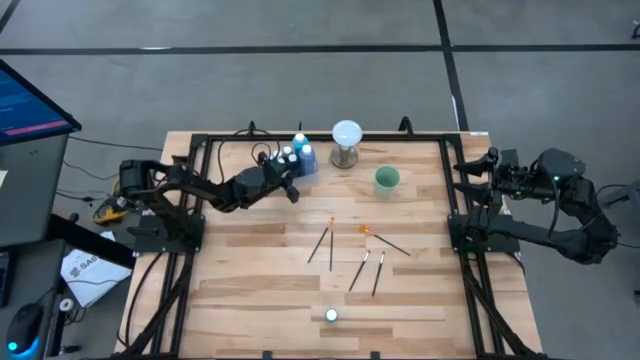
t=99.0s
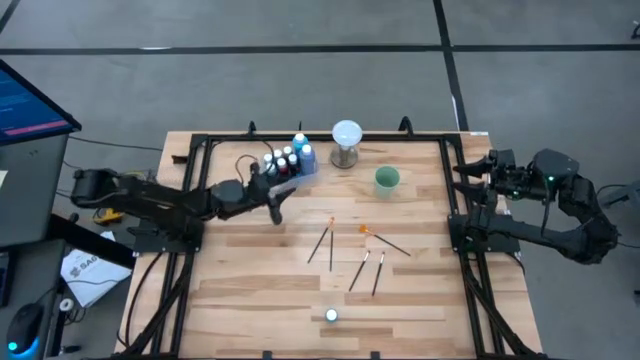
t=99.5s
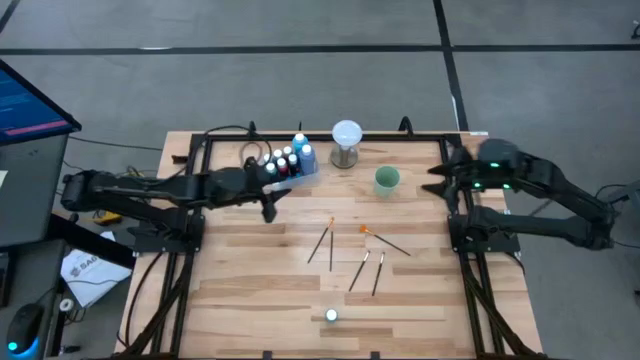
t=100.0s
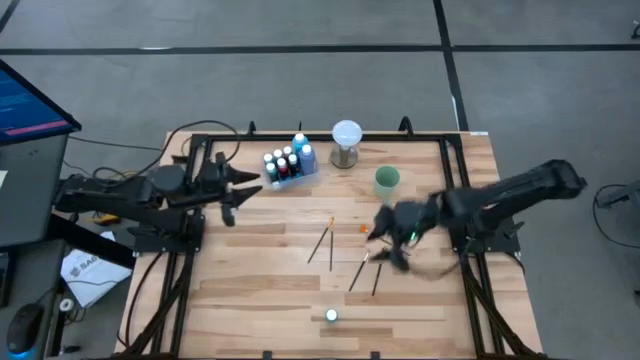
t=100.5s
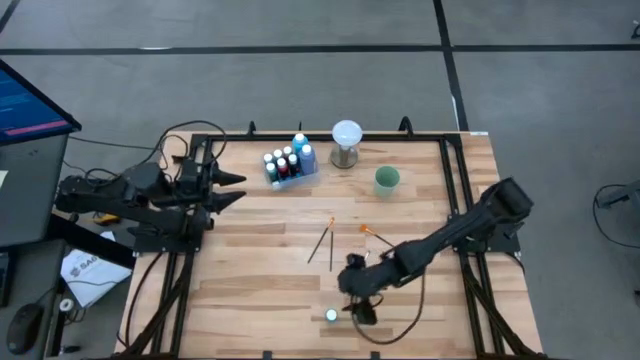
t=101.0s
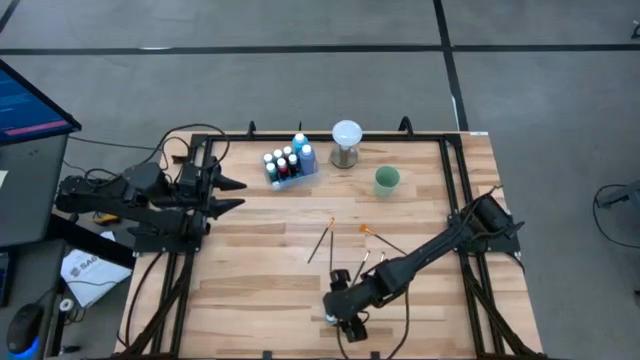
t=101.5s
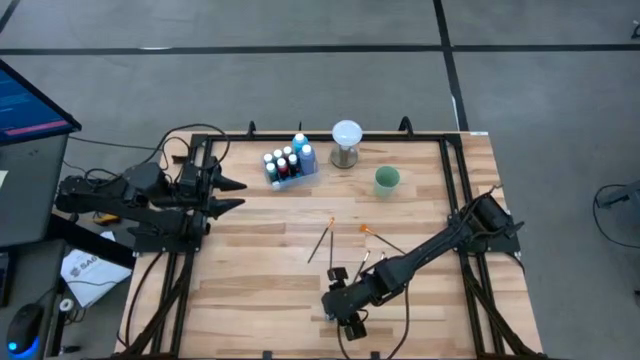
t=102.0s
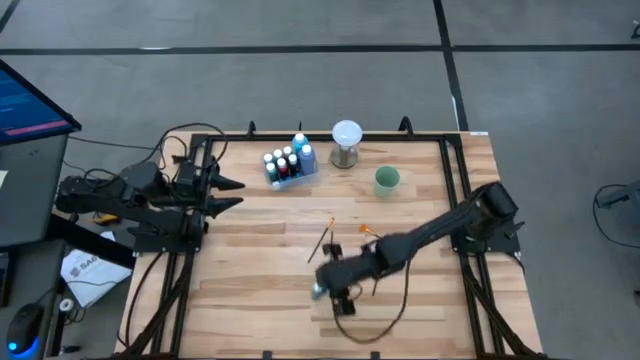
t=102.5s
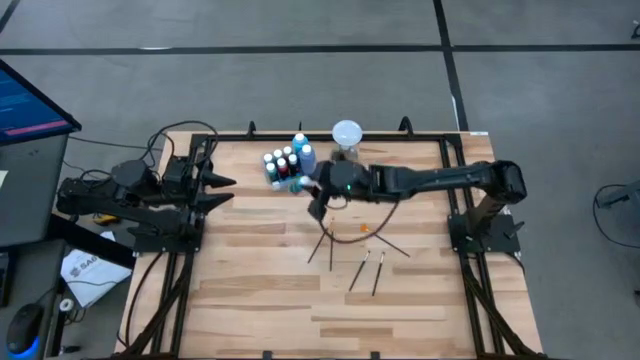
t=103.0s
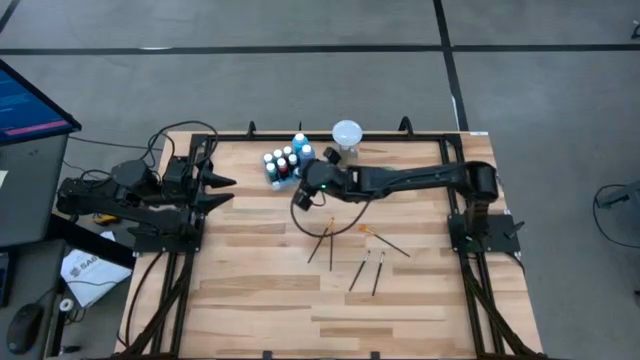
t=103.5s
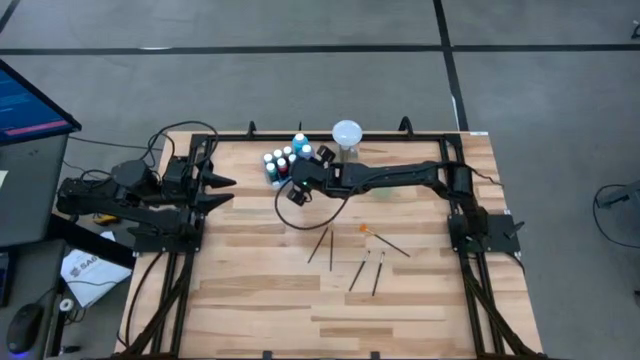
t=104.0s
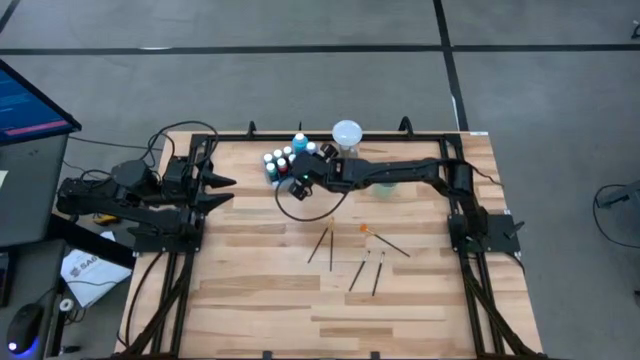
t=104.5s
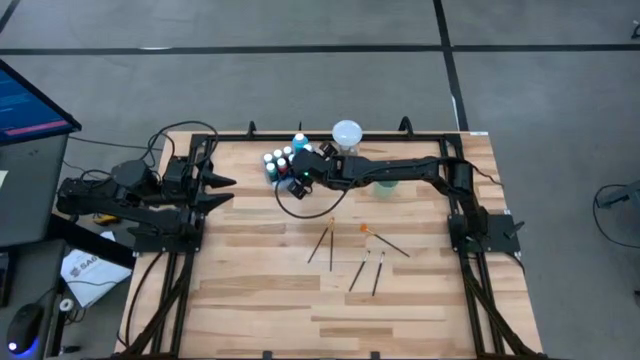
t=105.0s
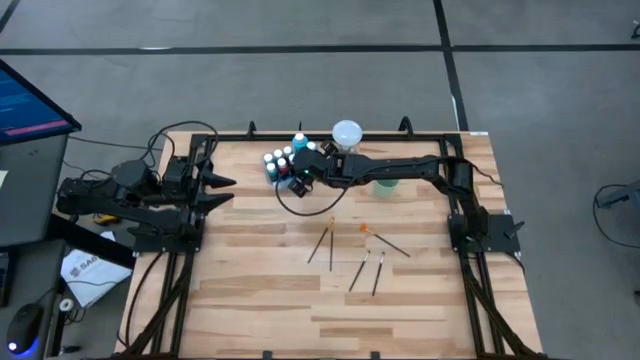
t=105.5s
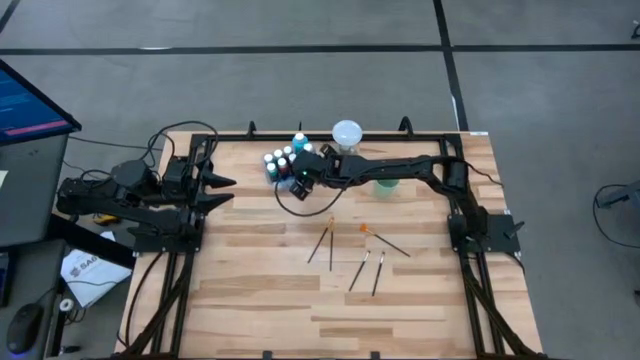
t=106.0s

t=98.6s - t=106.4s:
Task: Pick & Place Paint Supplies
Put the small light green paint bottle into the transparent bin

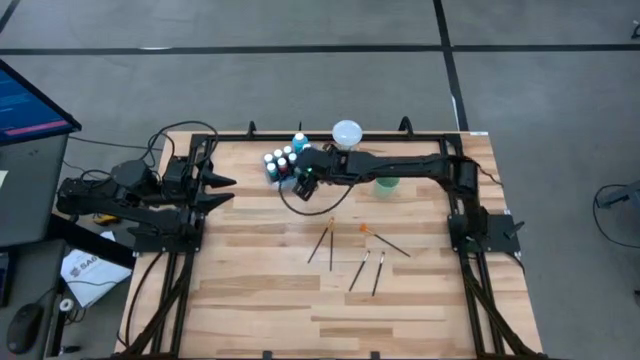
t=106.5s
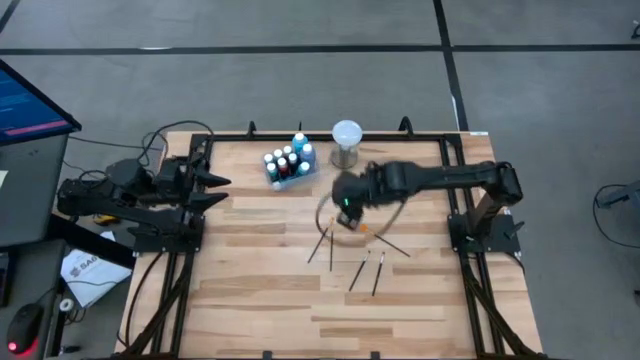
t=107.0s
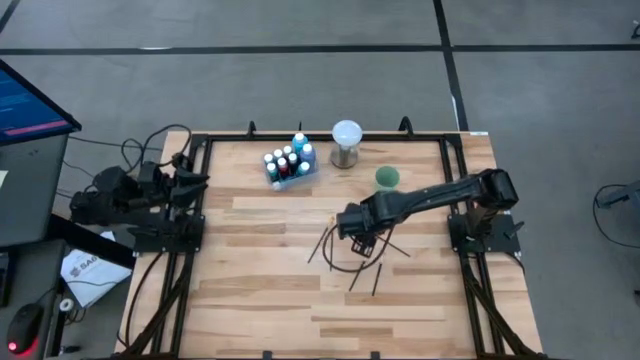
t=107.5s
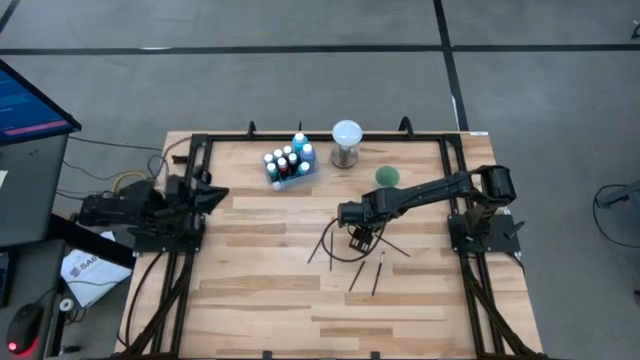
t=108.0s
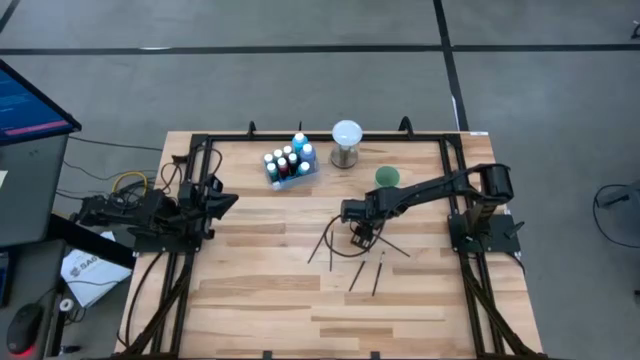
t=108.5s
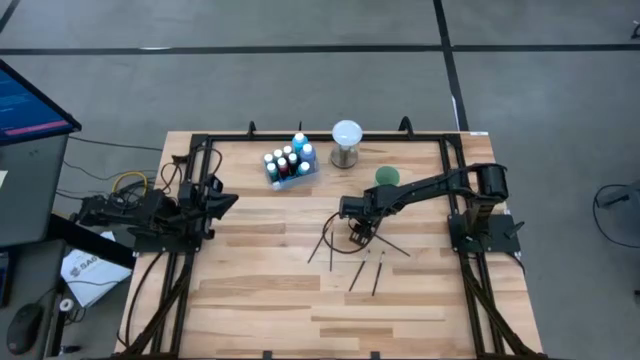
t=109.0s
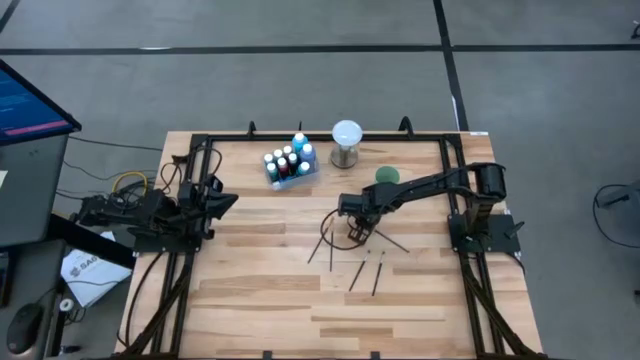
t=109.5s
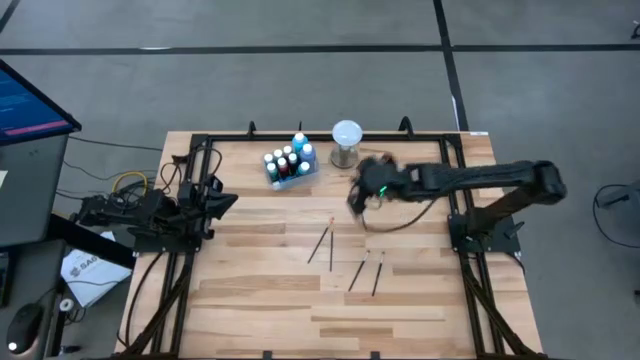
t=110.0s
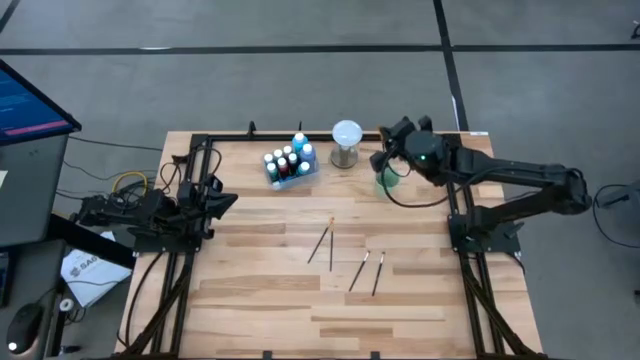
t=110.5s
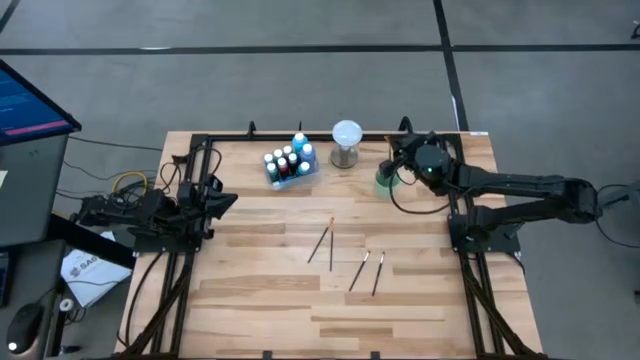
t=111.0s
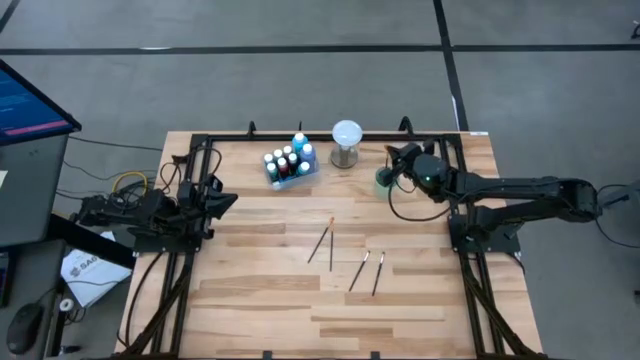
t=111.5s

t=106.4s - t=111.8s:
Put the right gold paint brush into the cup

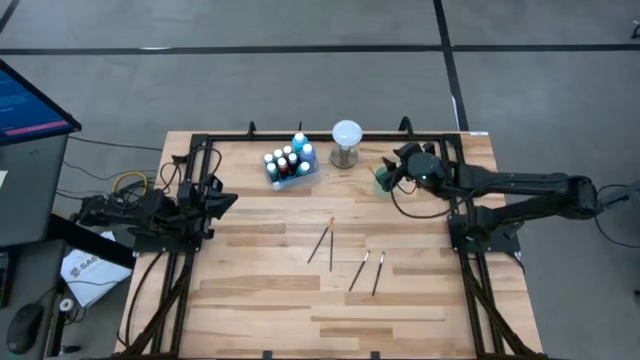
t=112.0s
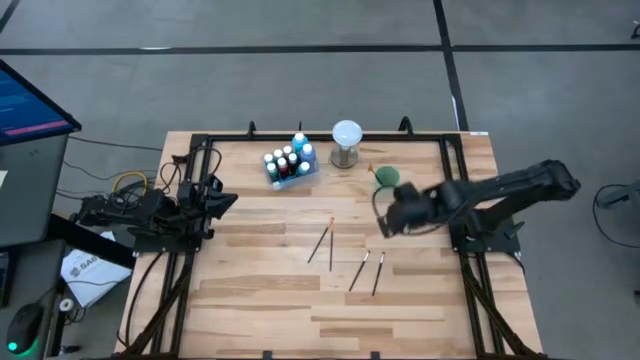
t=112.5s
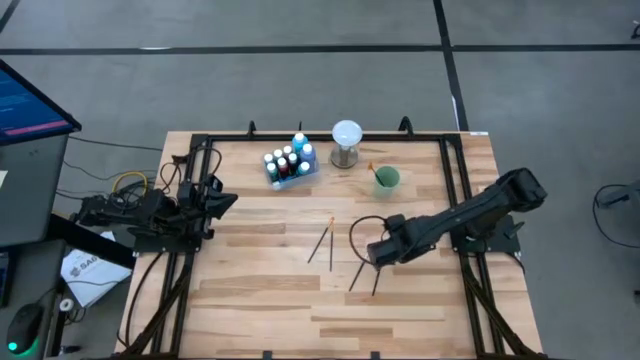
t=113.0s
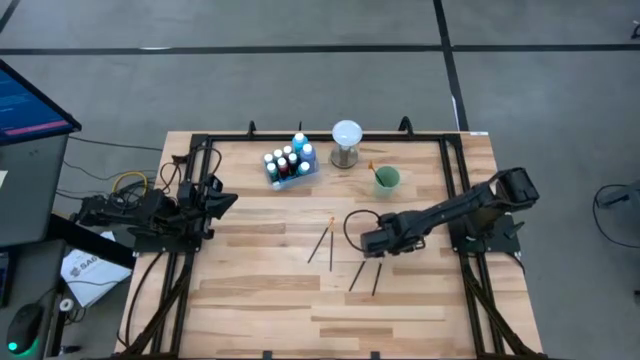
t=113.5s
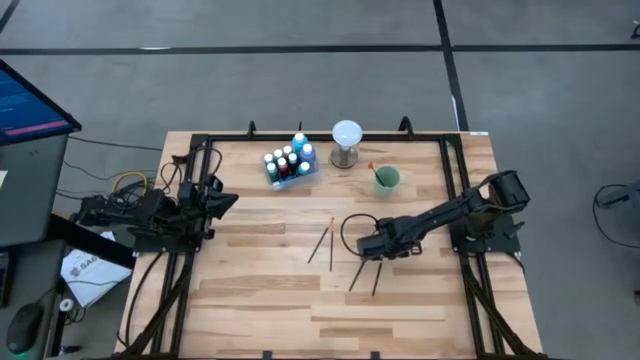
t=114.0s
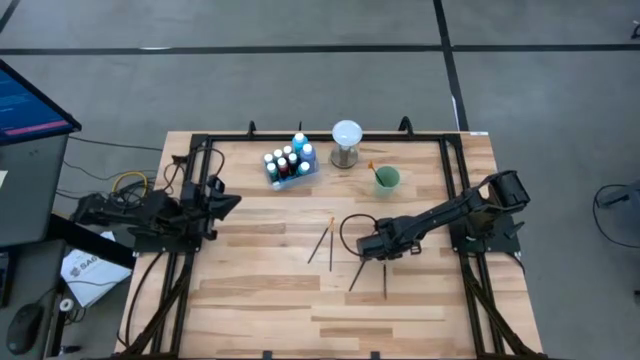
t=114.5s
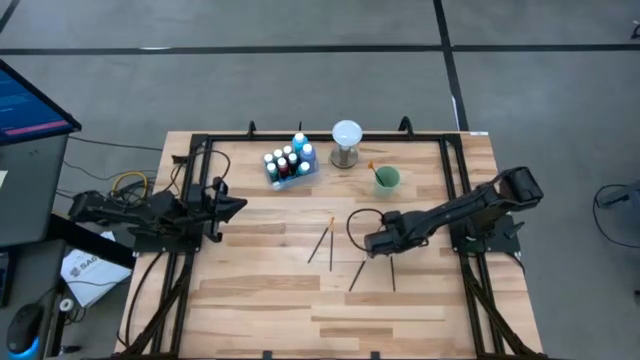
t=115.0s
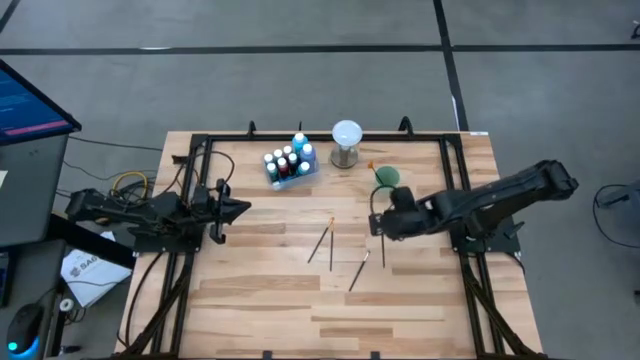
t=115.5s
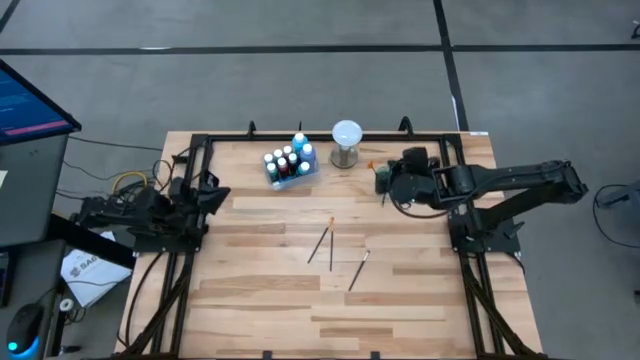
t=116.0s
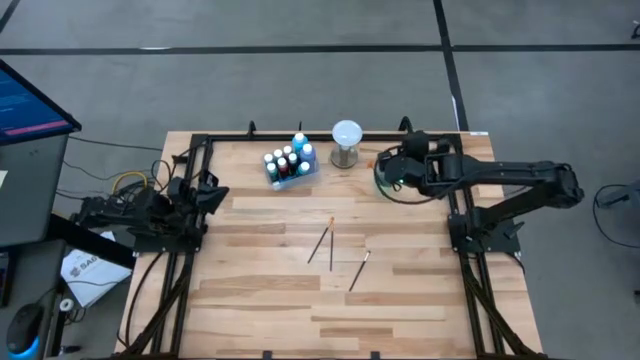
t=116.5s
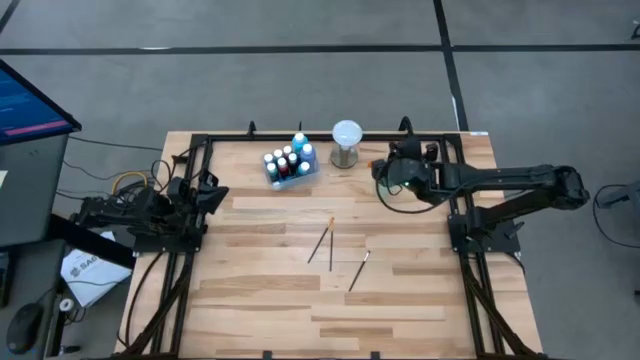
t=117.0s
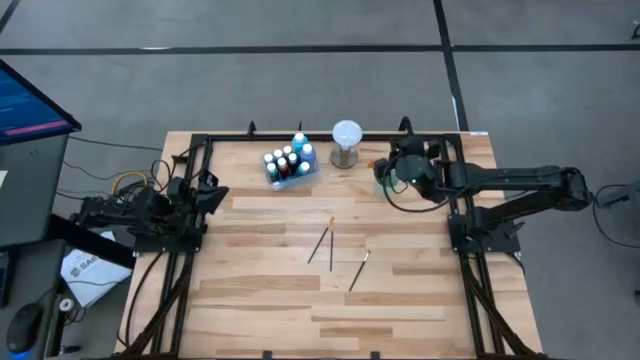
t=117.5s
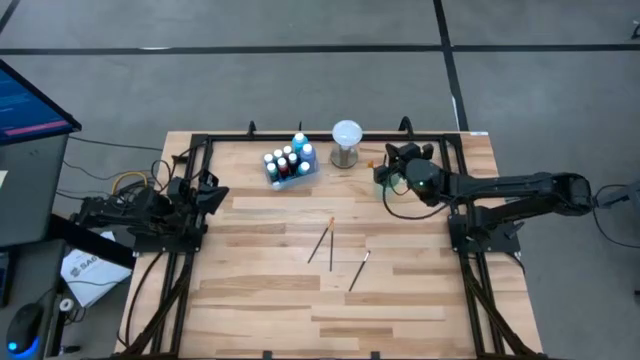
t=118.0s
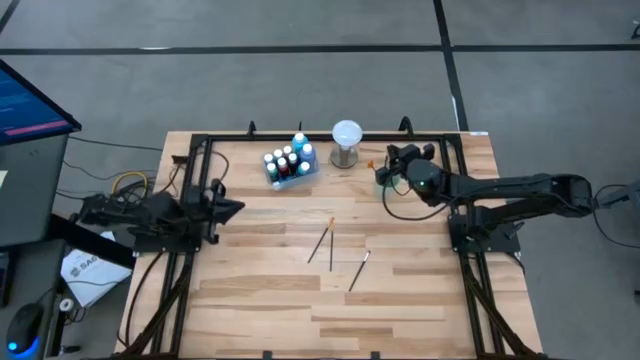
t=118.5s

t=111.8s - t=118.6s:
Put the right silver paint brush into the cup

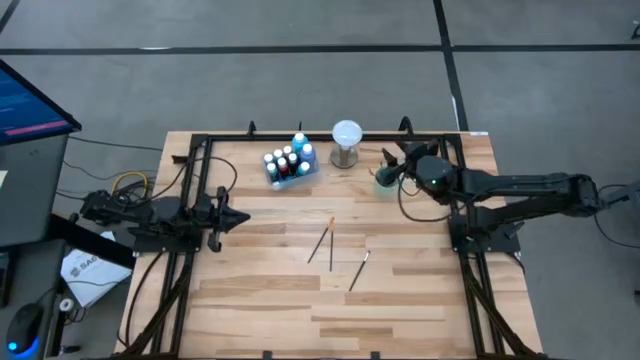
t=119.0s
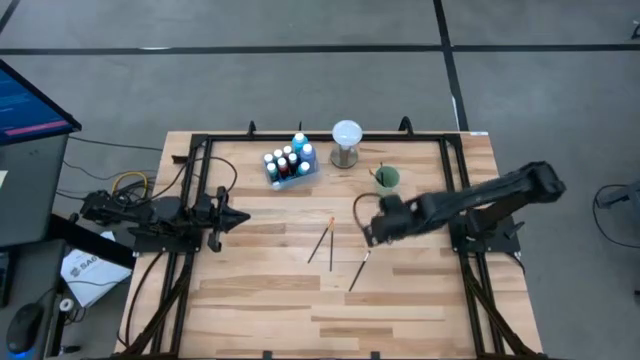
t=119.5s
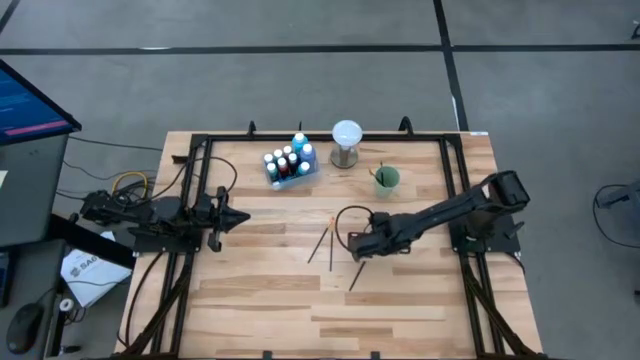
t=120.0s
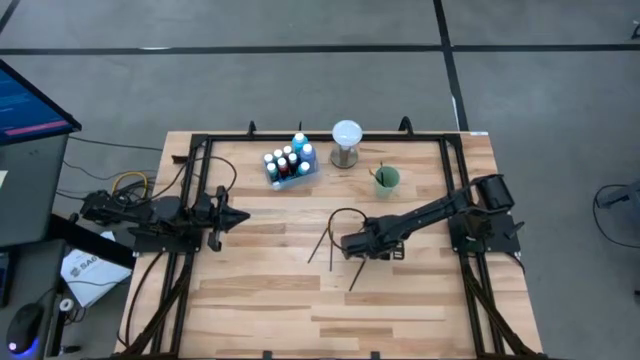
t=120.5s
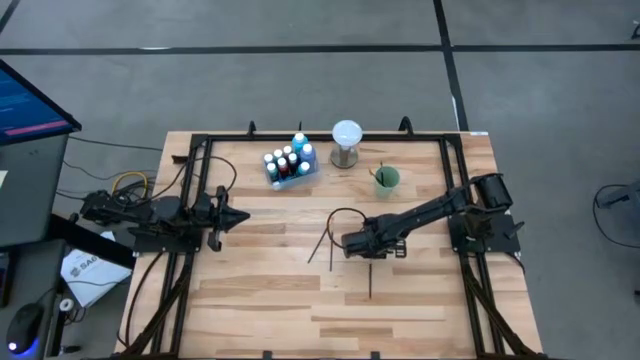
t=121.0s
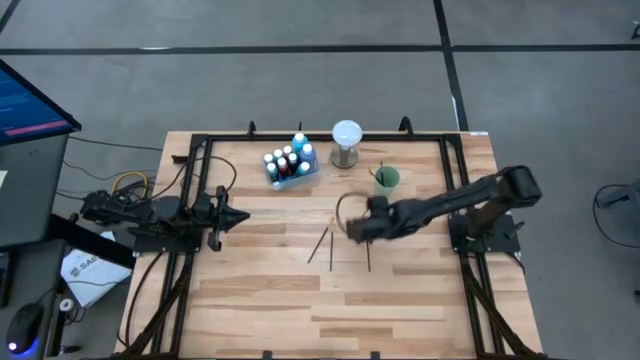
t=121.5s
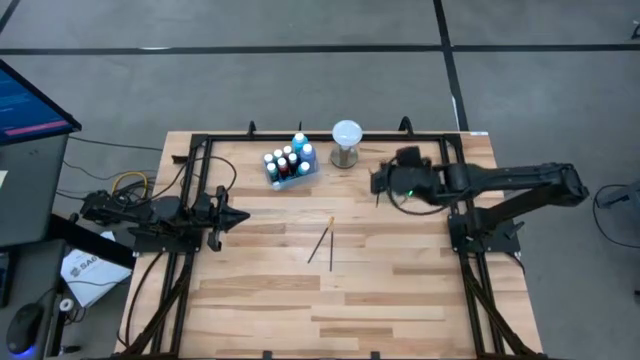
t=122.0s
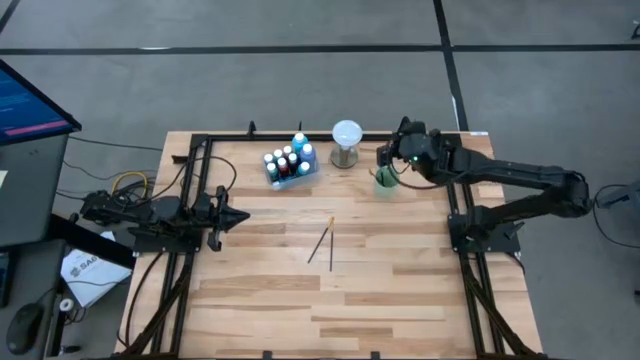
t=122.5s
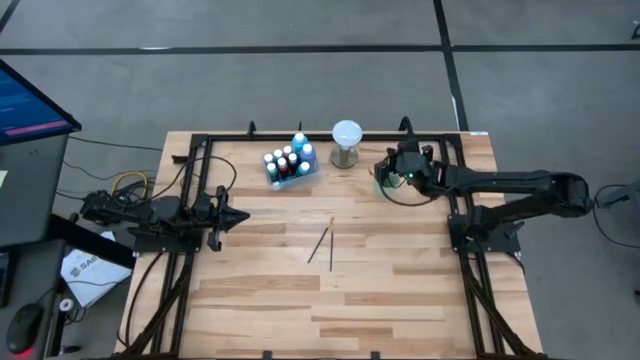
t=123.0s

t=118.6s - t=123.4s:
Put the silver paint brush into the cup
